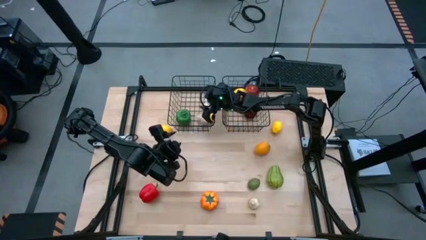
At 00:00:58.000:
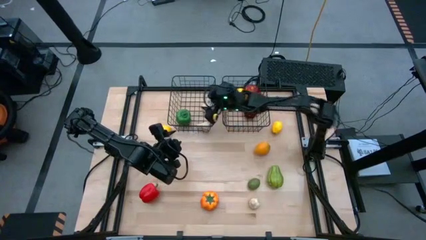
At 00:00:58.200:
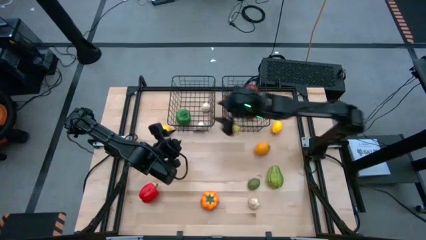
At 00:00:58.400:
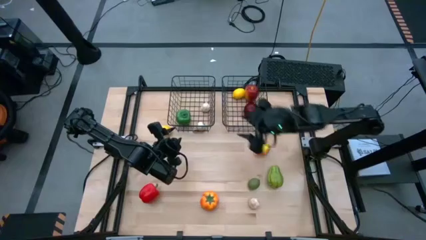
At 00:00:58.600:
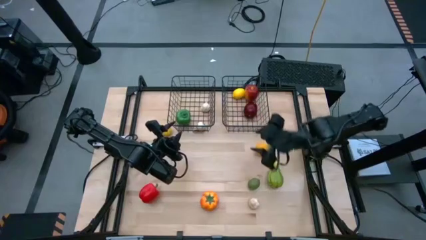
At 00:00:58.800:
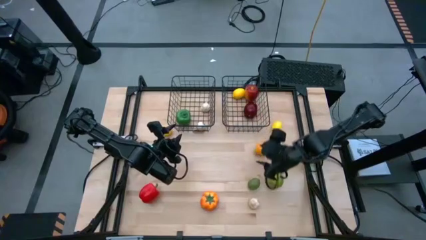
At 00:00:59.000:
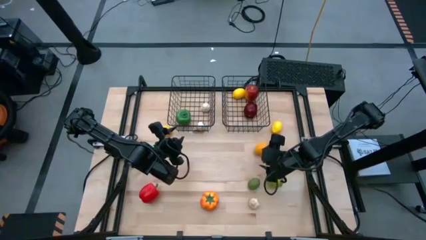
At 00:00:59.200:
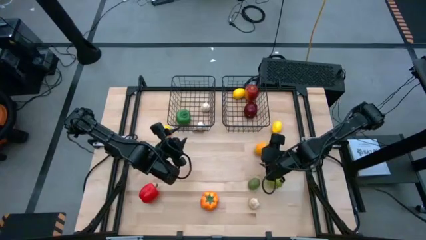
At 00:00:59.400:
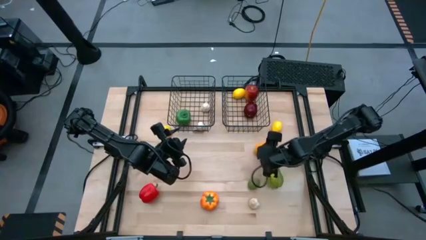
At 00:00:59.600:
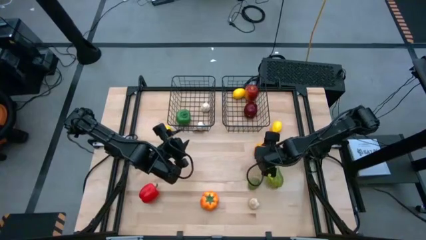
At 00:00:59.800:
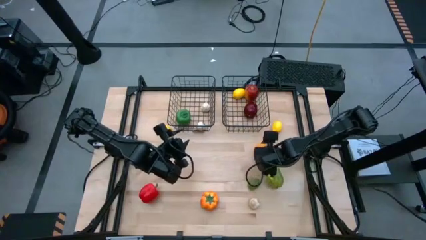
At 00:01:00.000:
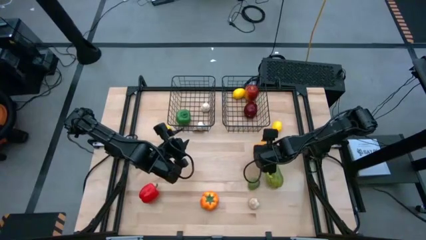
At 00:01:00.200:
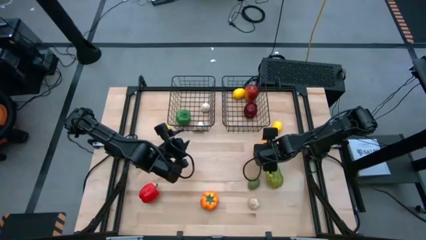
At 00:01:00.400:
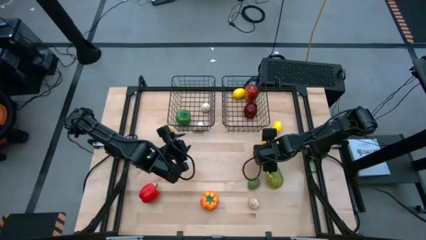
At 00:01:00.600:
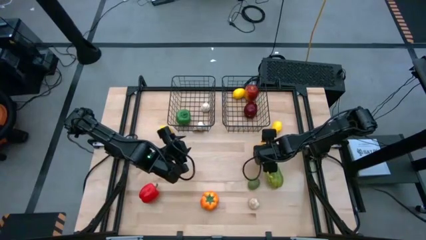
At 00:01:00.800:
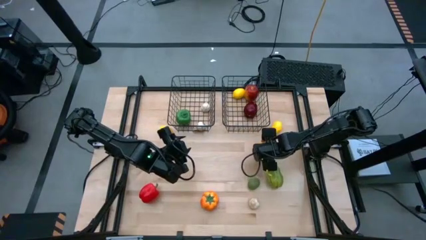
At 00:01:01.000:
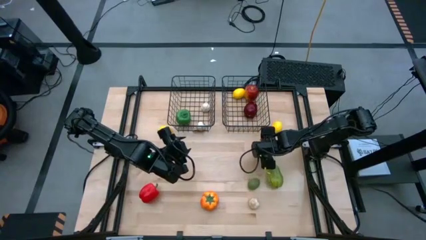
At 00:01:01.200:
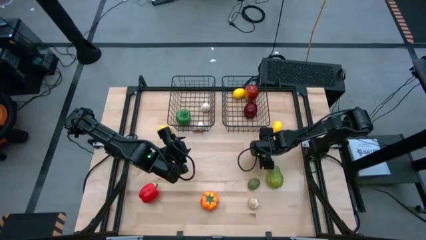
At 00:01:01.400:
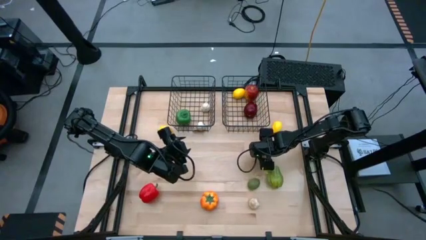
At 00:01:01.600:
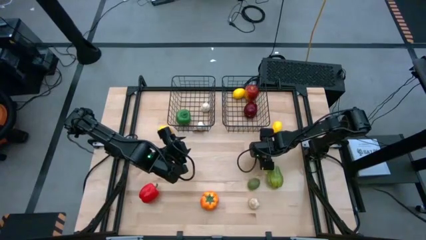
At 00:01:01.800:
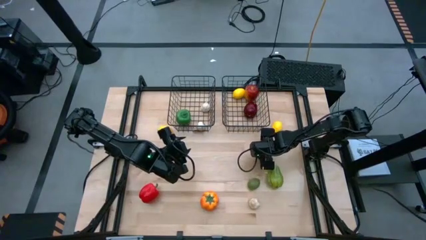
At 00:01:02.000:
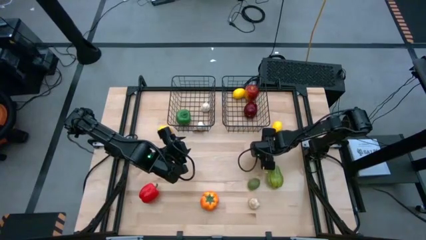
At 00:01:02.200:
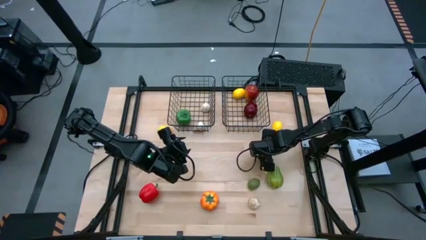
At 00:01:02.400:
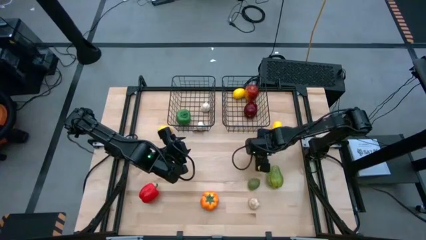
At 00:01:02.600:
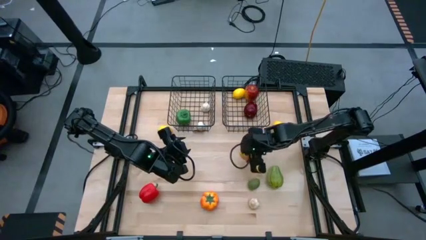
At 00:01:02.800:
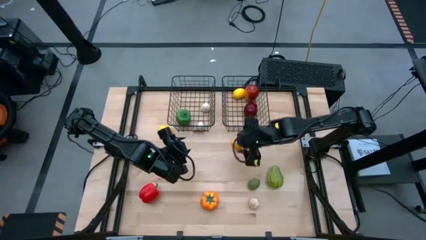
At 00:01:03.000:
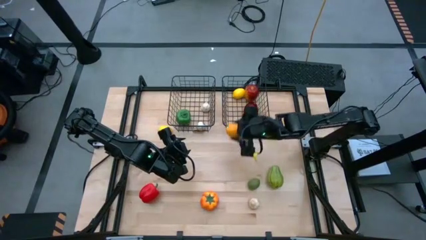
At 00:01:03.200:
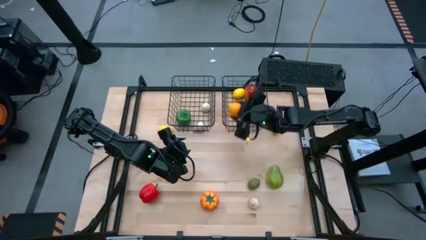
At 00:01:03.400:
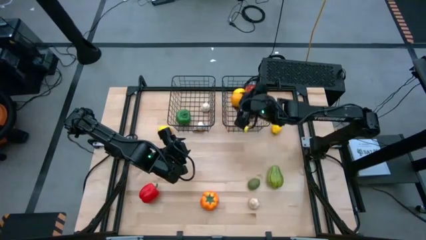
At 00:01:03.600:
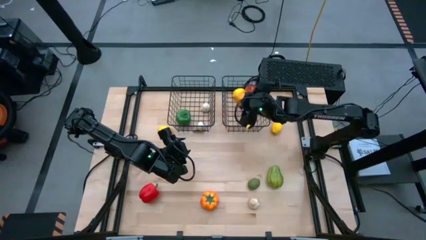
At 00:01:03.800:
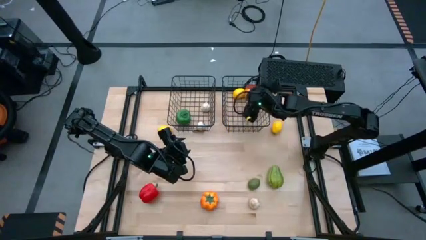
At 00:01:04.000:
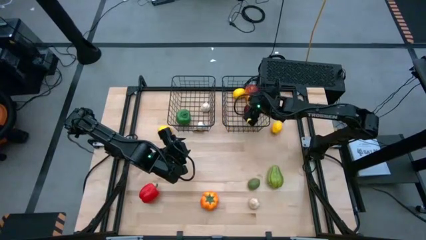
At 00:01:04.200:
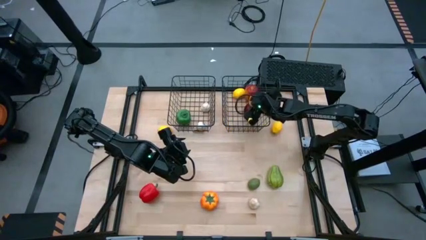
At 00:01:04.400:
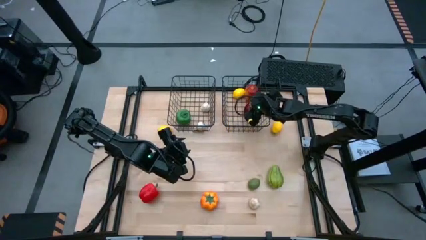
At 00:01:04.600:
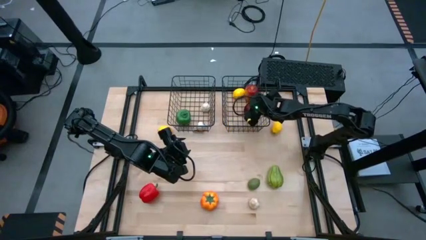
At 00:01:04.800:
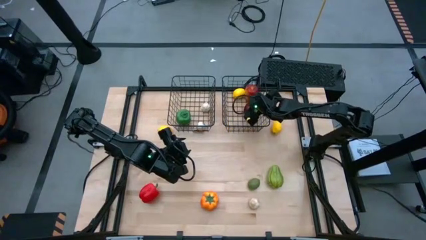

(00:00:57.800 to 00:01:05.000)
Task: Sort produce into baskets
Put the yellow lemon into the right wire basket

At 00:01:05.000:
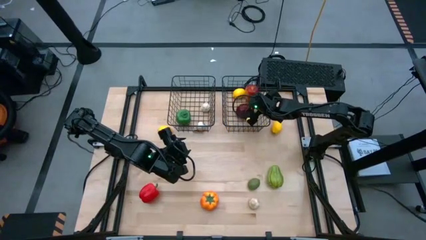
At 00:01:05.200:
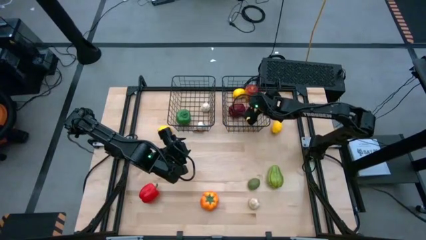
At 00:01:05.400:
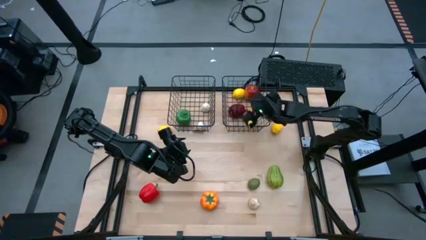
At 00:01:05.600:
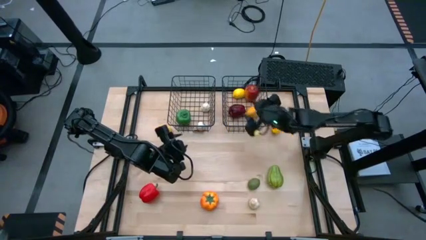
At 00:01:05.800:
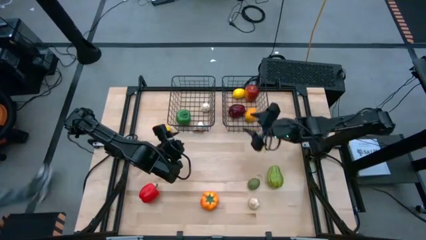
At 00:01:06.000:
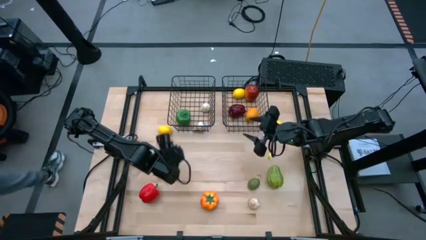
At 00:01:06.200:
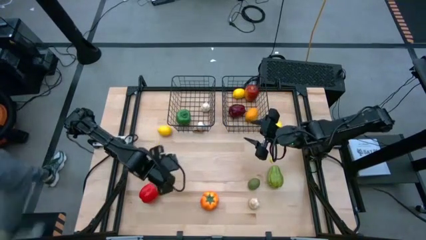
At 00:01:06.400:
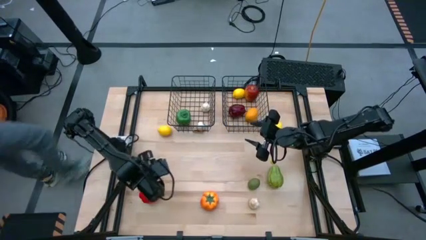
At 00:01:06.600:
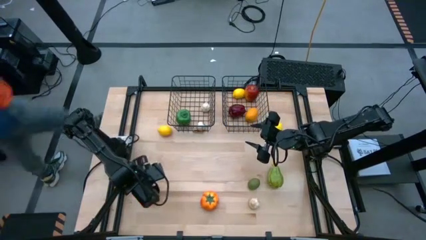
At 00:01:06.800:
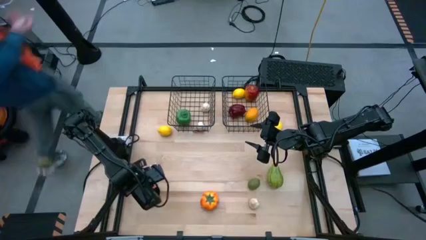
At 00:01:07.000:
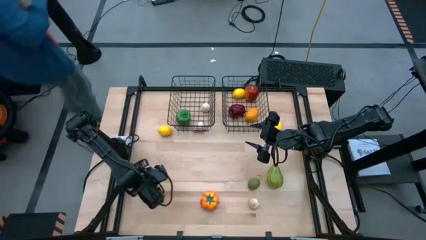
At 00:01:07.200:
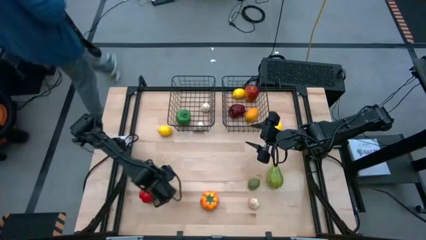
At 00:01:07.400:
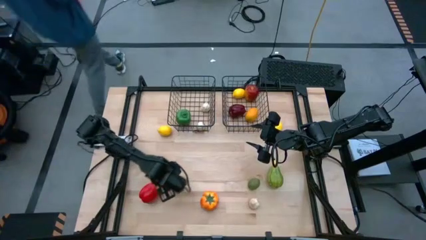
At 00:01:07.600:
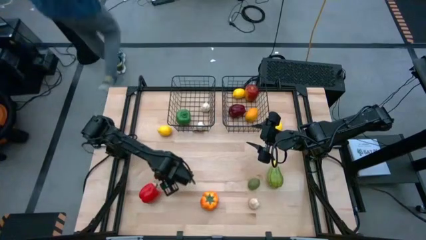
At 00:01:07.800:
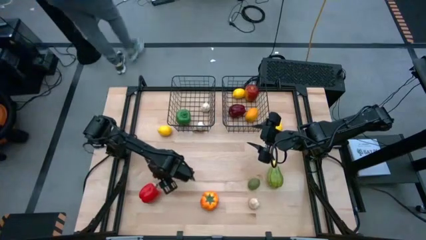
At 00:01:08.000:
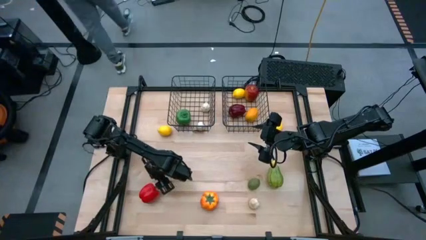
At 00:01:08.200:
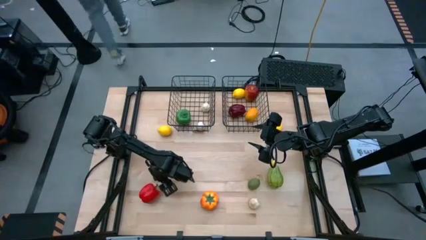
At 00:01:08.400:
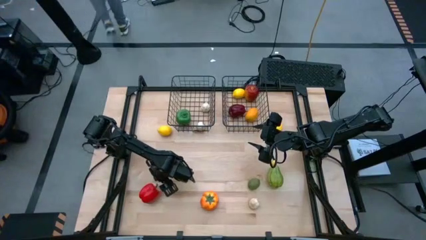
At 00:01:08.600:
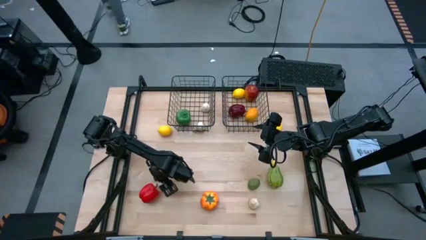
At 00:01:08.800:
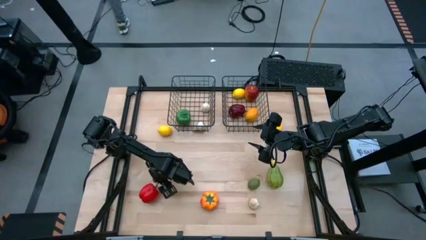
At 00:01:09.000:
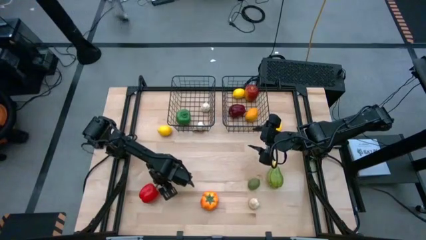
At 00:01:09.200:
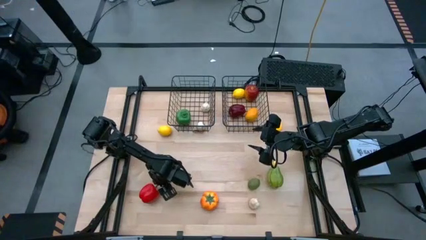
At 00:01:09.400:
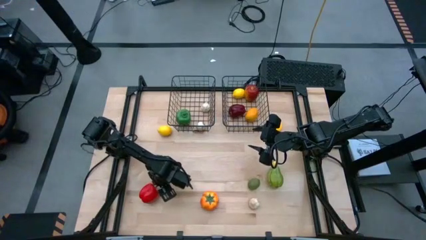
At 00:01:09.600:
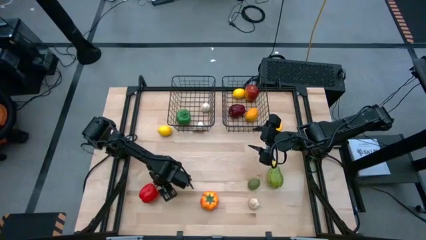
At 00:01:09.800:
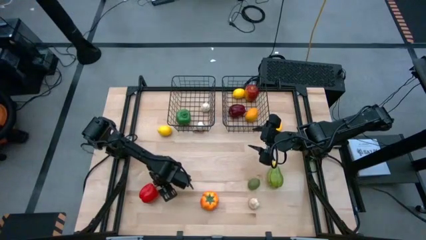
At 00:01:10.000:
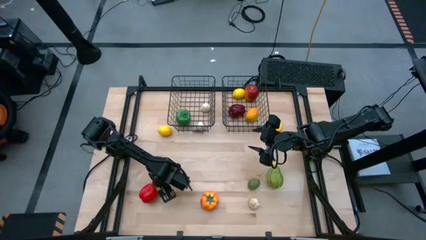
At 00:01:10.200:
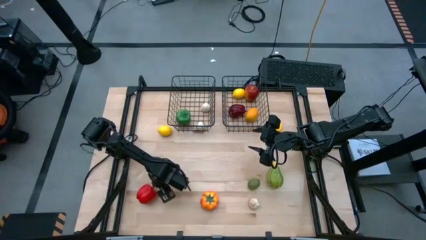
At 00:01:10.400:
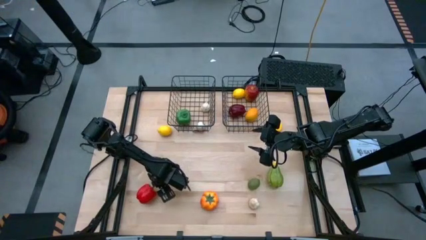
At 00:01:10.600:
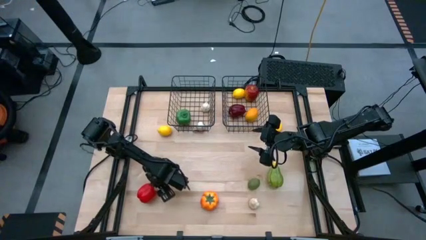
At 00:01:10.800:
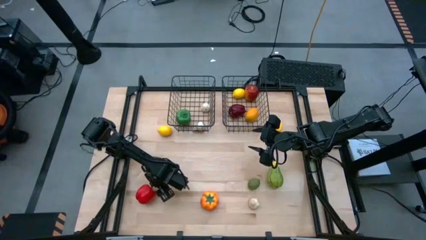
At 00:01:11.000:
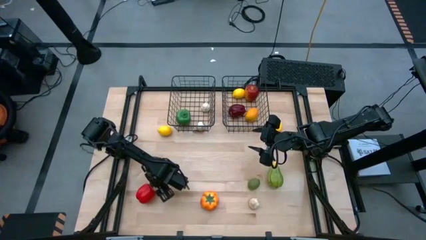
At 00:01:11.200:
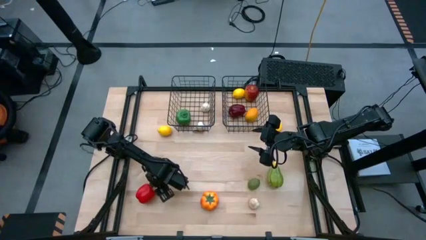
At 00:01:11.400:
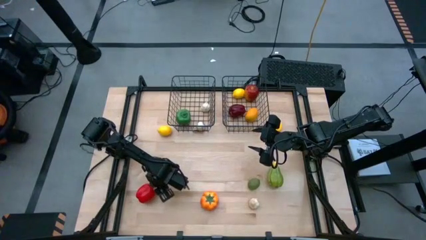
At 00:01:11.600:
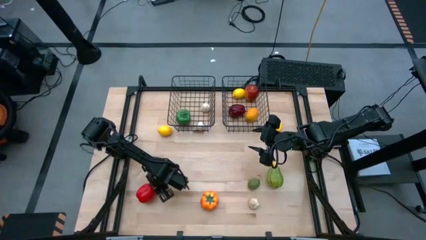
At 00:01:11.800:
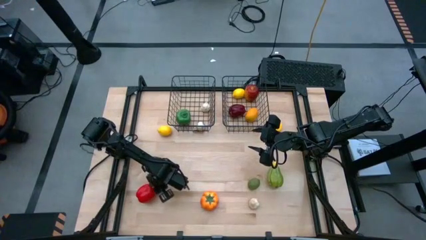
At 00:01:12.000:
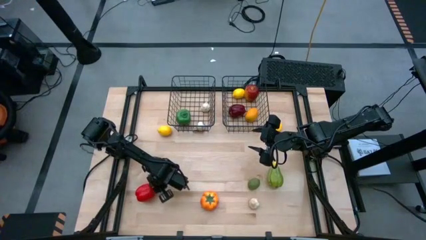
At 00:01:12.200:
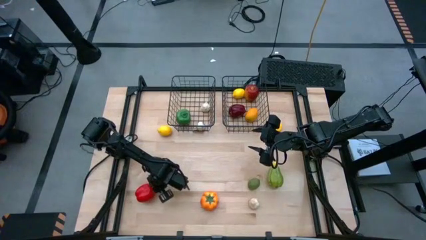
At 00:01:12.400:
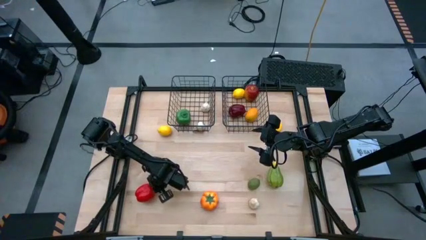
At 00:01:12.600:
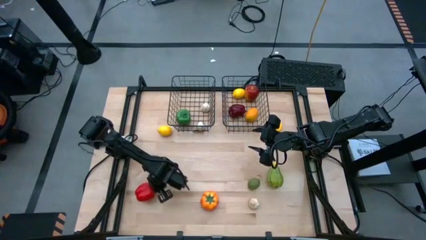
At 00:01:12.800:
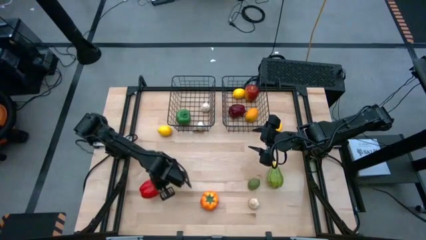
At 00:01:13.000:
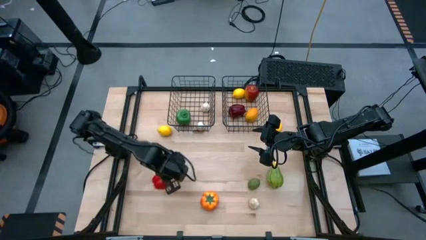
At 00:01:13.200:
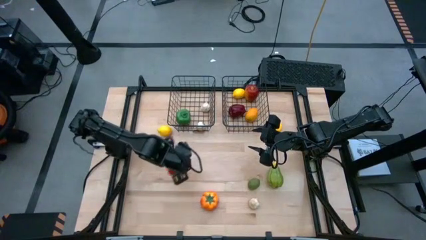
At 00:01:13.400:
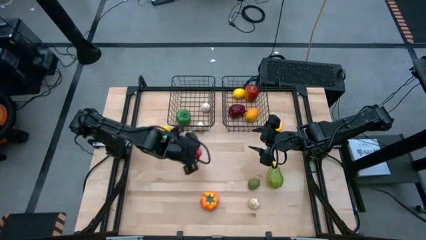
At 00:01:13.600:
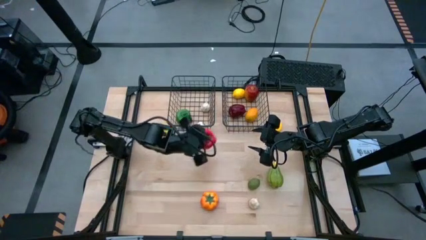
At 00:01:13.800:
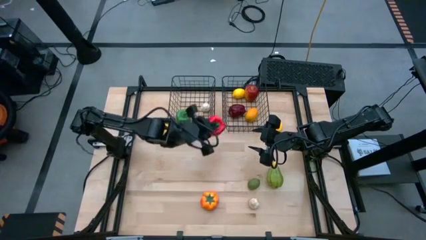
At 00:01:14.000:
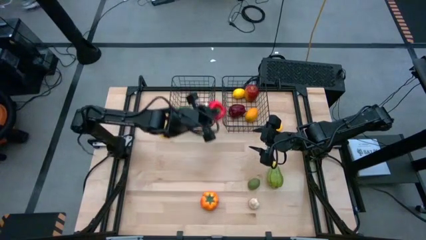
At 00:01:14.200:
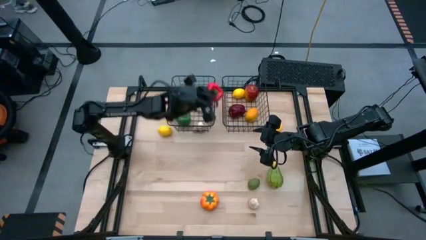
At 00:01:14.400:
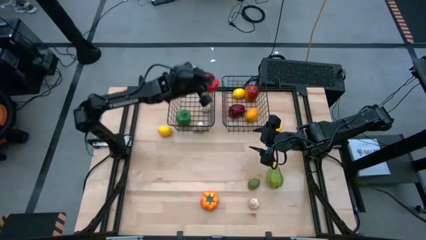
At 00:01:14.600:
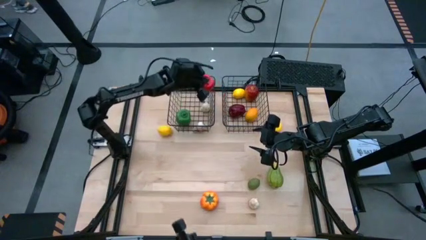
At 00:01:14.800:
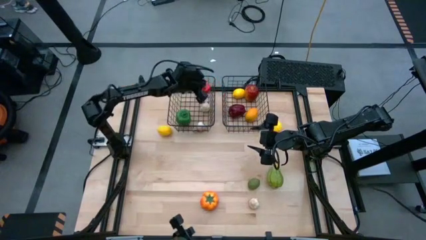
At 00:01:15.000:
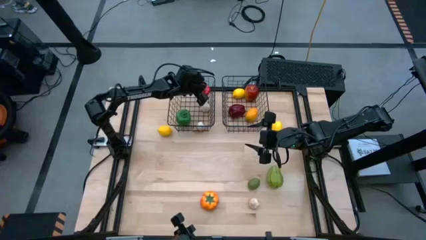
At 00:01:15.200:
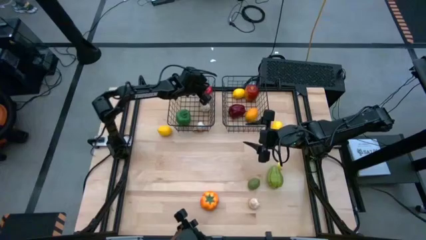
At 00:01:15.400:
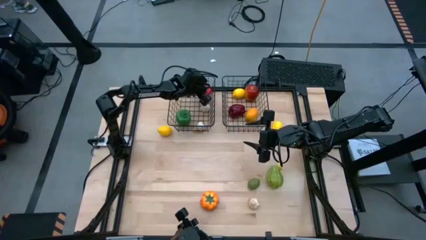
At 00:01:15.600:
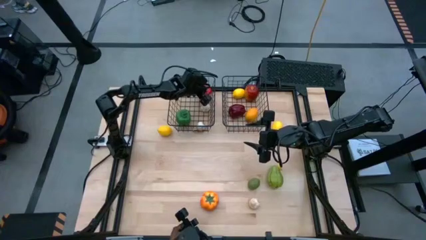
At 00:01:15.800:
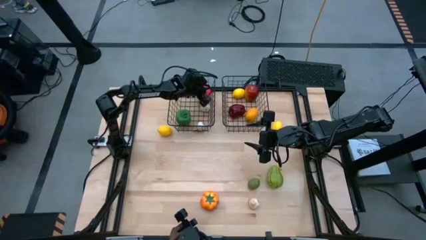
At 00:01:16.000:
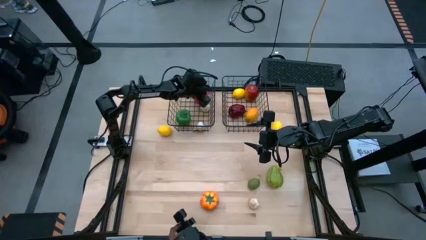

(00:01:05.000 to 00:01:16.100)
Put the red bell pepper into the left wire basket
